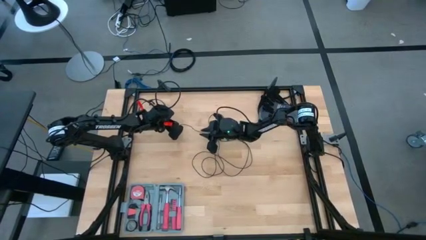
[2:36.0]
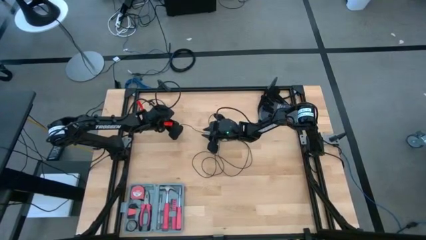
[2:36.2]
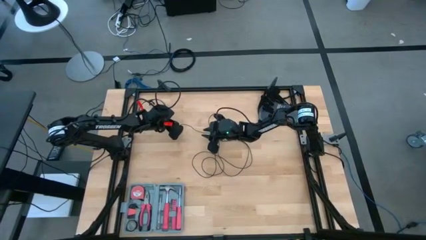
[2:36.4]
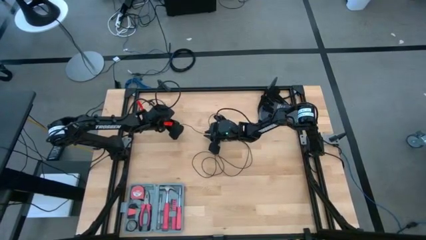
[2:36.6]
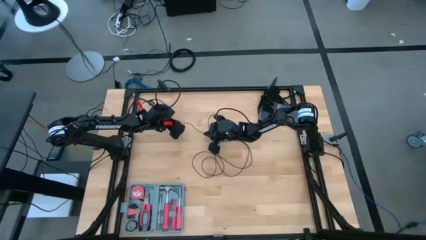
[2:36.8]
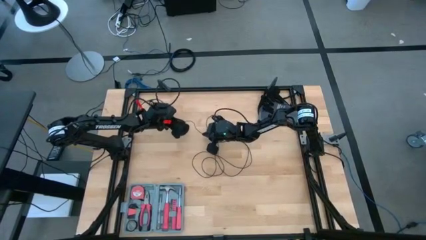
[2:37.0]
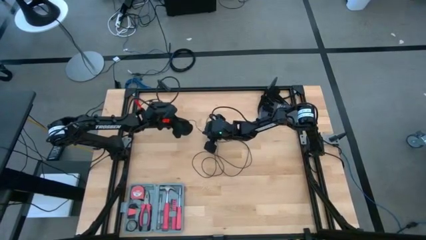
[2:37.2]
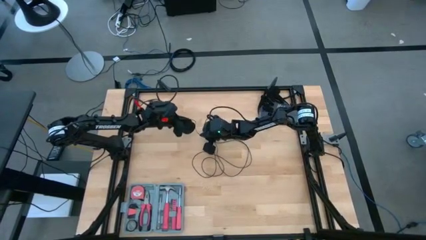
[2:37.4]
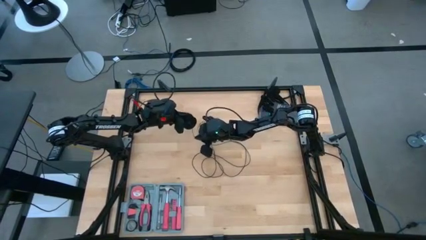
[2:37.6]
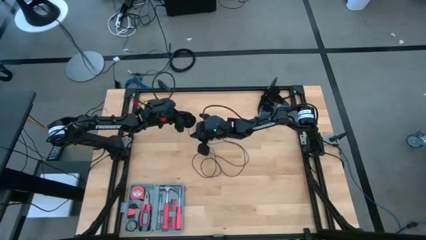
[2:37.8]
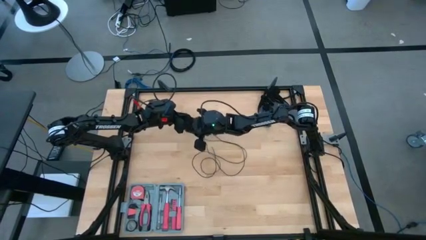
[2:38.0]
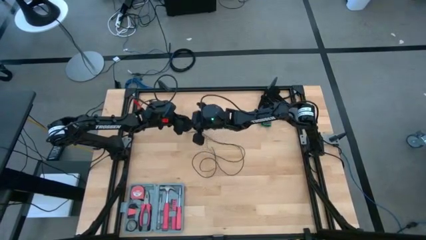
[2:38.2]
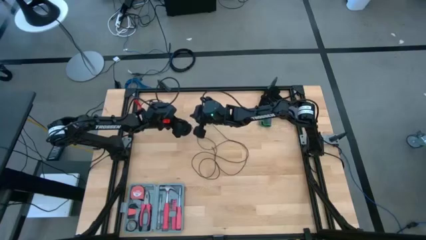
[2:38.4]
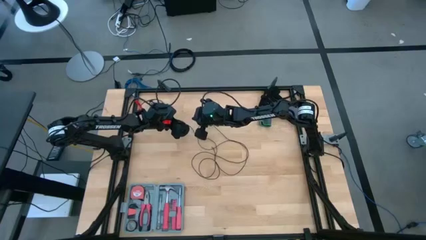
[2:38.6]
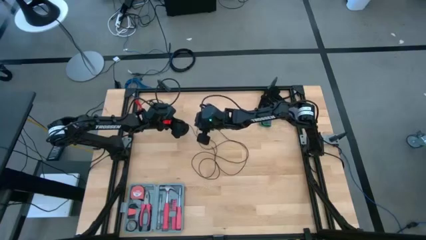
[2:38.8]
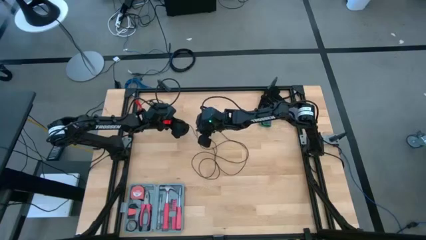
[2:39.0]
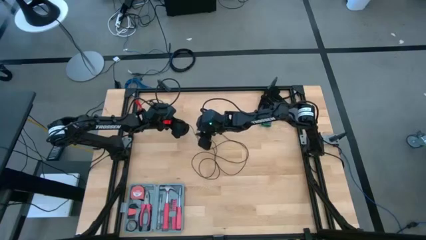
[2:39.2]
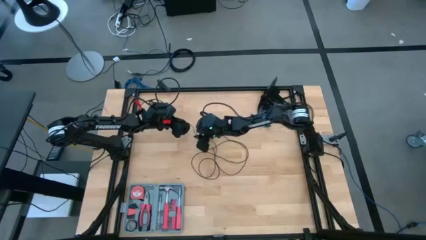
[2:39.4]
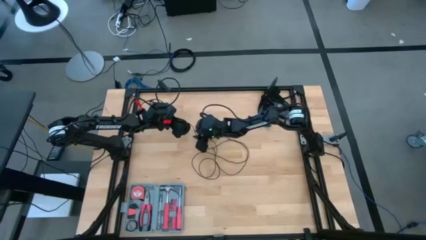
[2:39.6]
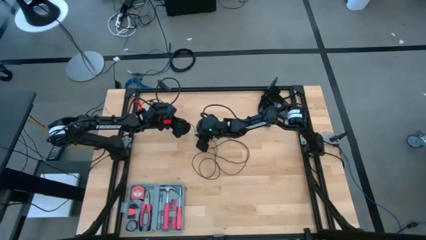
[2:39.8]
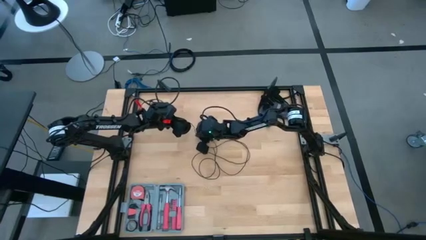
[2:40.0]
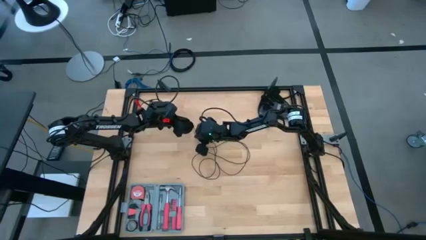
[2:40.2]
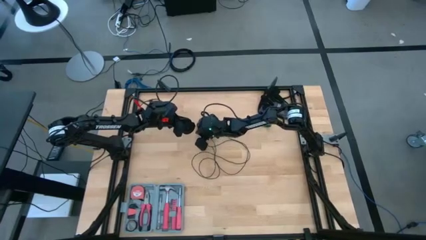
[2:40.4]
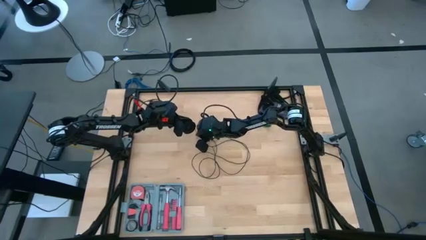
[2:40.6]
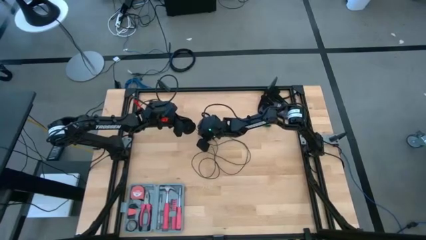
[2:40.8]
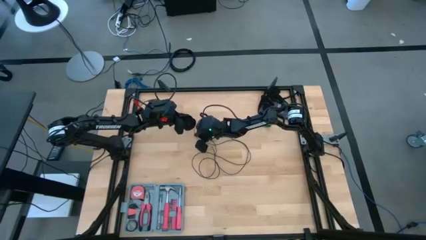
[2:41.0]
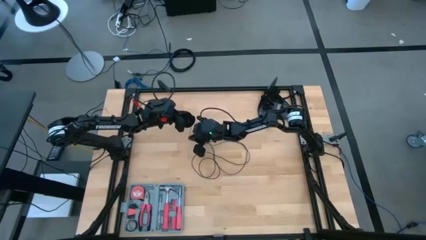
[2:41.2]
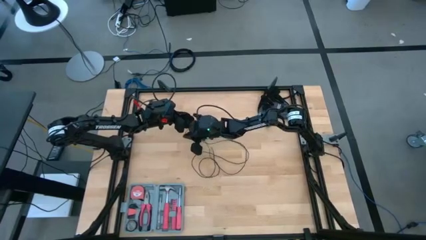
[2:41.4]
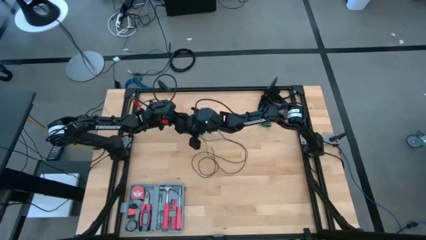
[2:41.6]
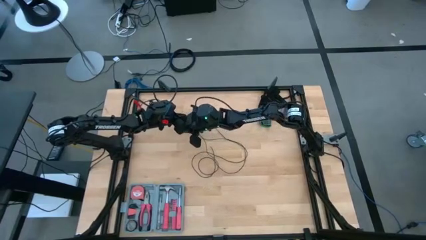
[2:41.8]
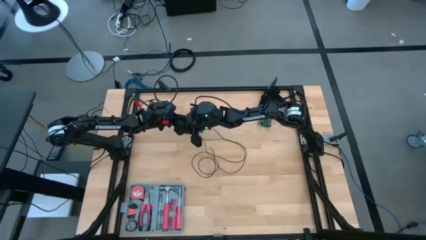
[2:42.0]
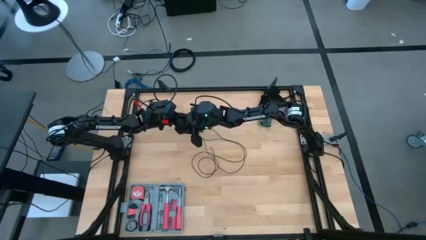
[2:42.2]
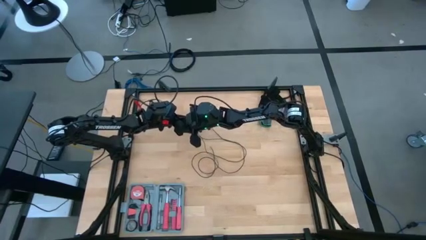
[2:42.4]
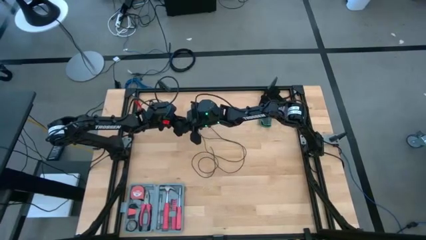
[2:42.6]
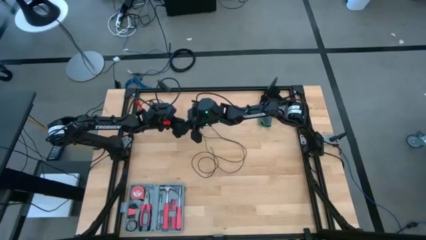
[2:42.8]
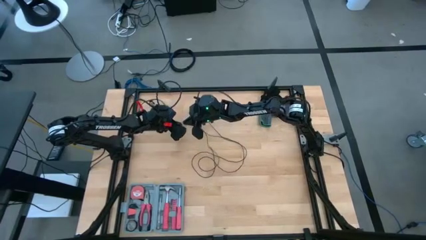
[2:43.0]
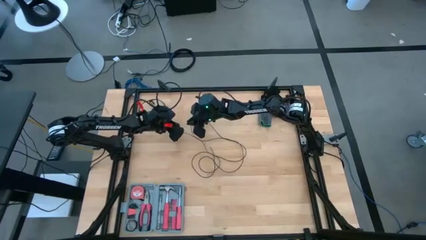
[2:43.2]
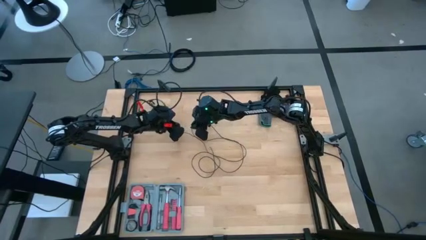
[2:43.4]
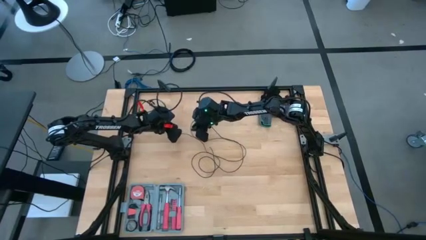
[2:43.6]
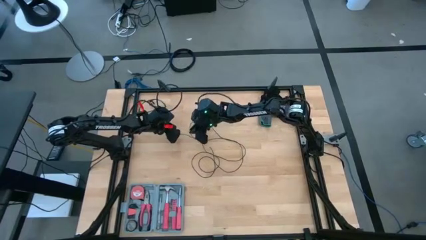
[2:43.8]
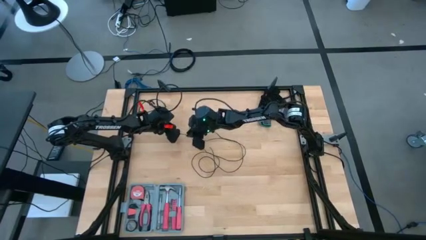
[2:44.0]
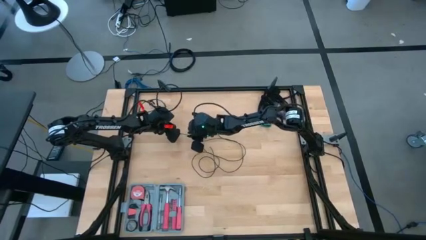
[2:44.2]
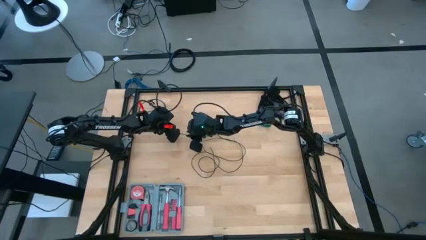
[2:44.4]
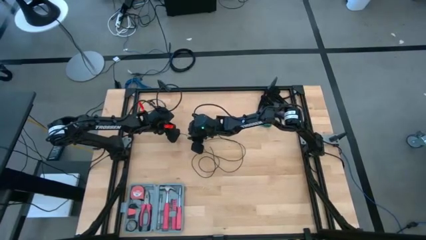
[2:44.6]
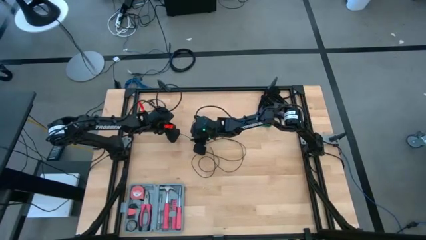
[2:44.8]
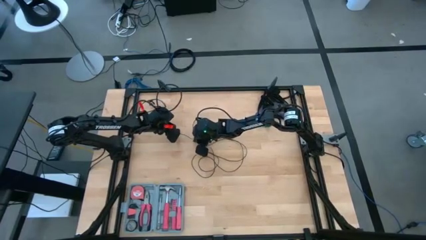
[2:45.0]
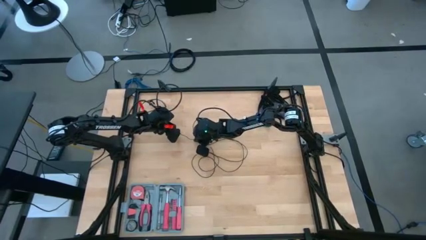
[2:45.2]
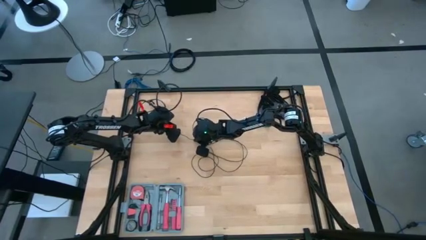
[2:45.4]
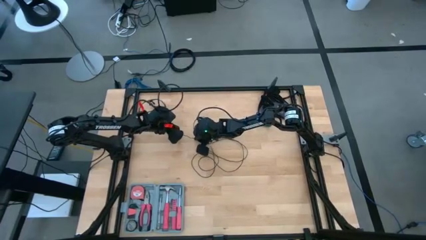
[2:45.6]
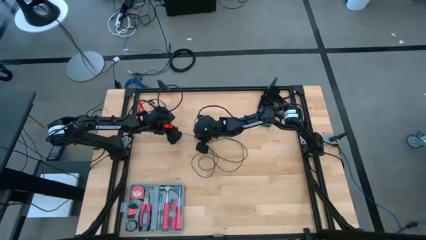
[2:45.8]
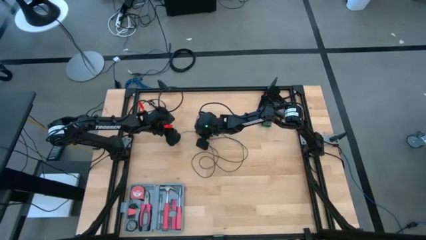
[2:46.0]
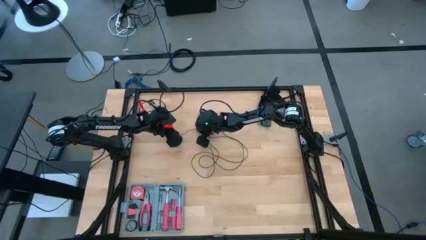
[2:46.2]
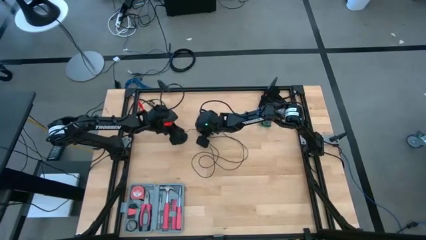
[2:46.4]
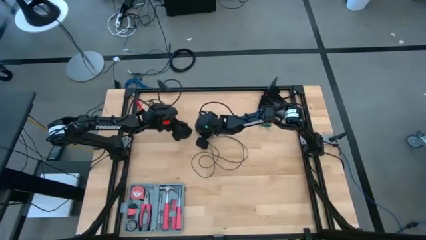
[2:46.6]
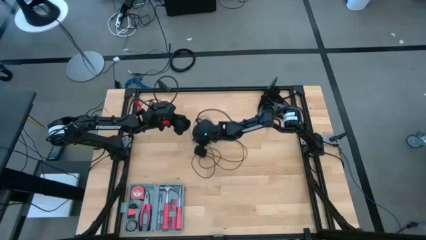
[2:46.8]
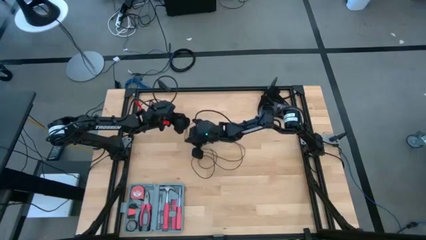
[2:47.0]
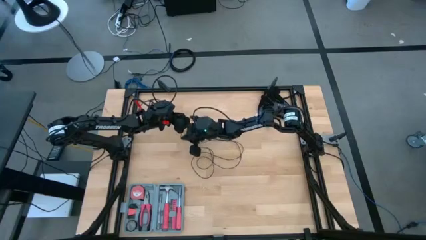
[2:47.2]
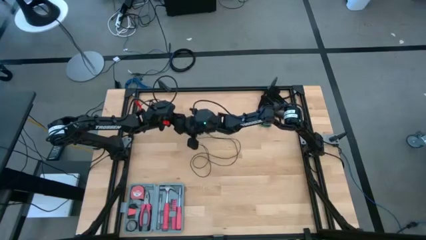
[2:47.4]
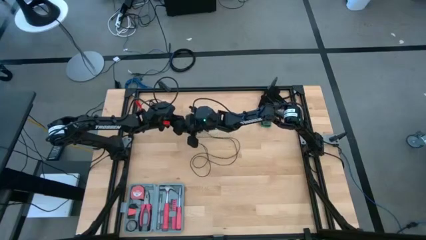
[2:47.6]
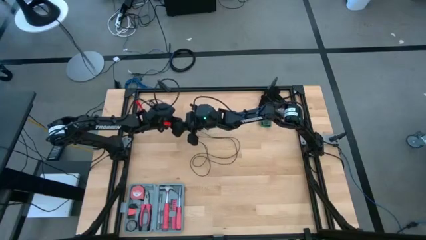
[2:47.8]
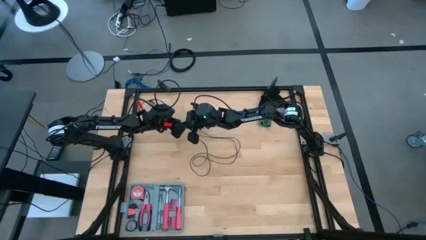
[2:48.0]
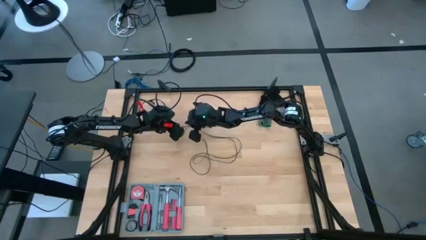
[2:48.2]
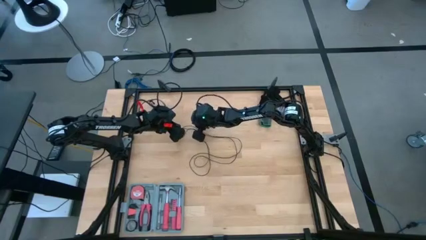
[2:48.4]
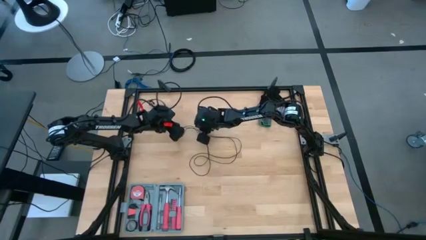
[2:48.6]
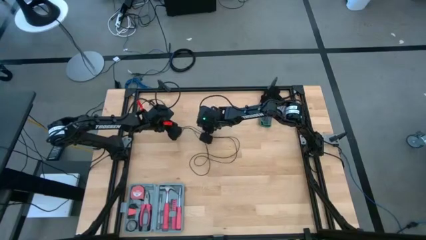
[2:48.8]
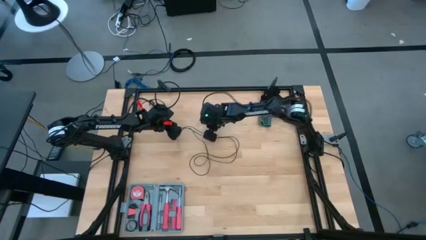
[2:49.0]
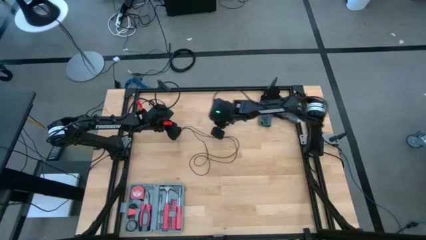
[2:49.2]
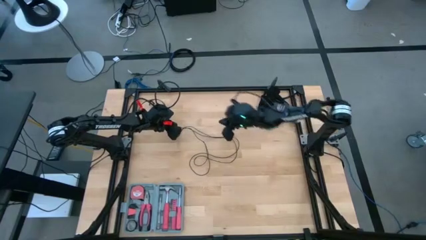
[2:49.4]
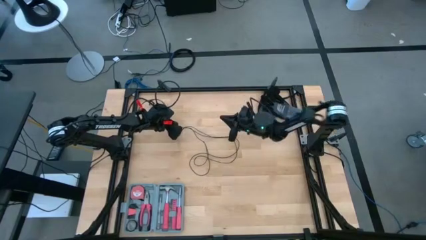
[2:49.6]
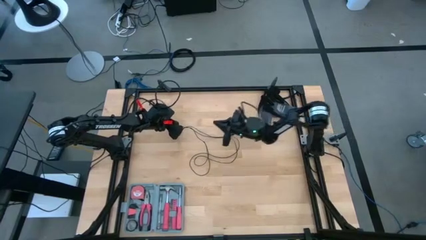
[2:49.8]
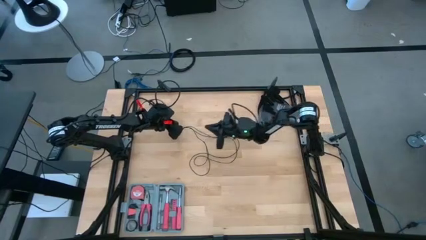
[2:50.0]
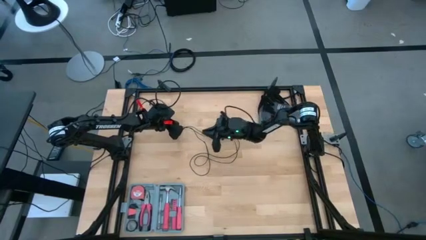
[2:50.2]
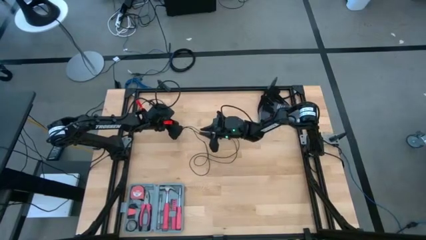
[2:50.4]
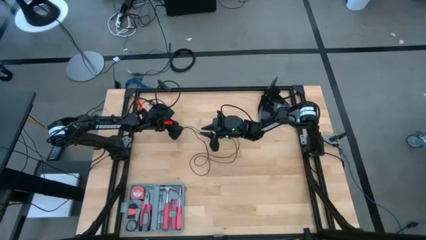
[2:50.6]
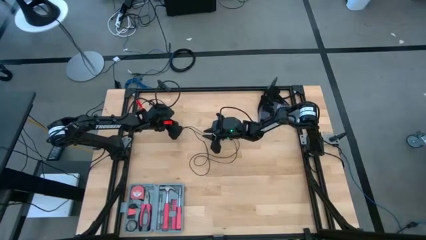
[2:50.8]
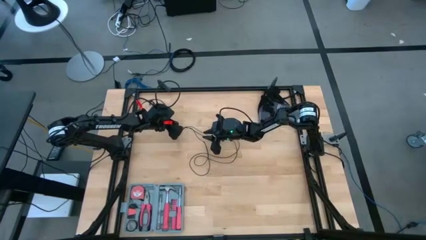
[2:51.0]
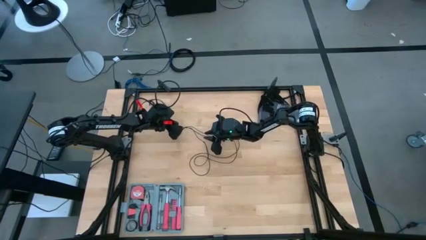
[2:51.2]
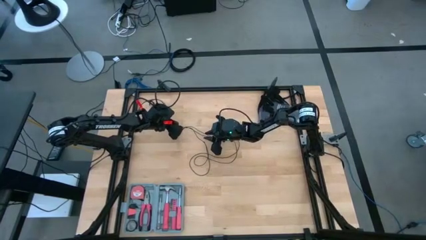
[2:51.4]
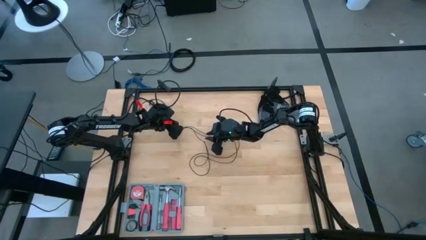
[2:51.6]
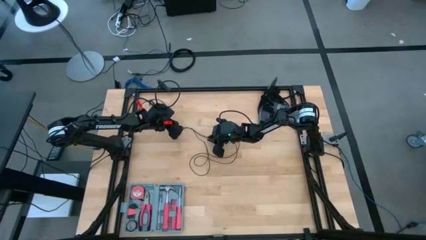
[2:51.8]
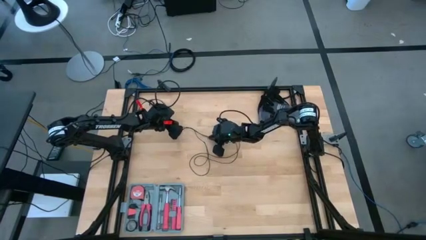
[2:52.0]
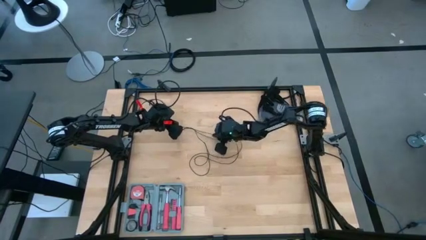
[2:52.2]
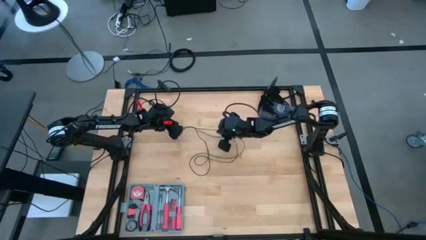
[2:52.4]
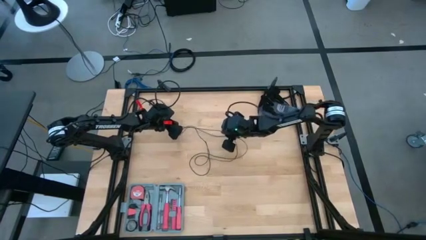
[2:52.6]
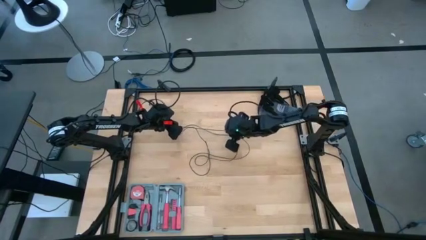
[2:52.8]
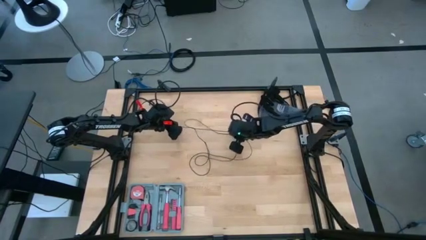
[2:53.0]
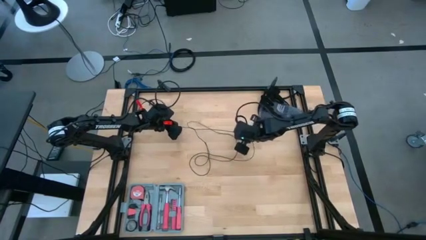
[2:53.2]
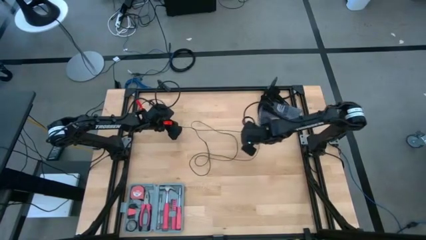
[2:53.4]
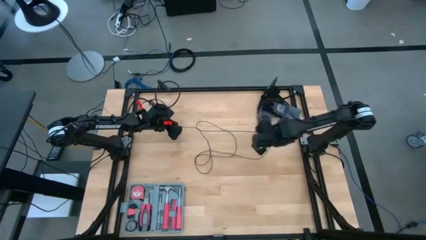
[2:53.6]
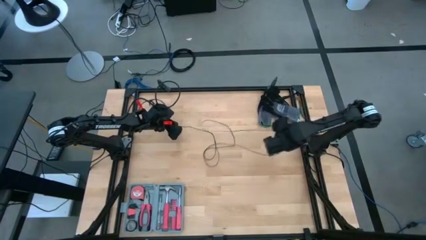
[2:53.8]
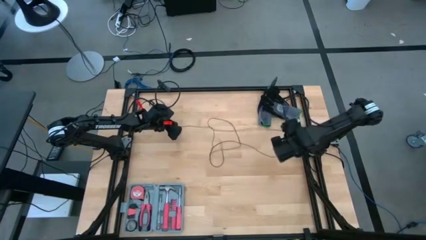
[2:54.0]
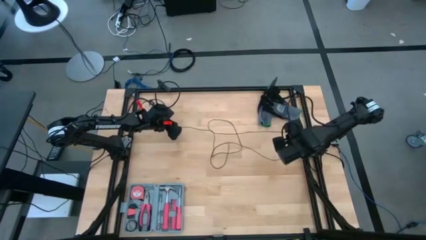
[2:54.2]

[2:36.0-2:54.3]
Task: Coil cords
Coil the black wire onto the black spool
